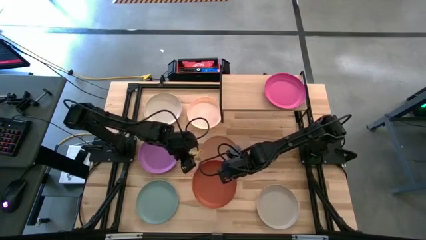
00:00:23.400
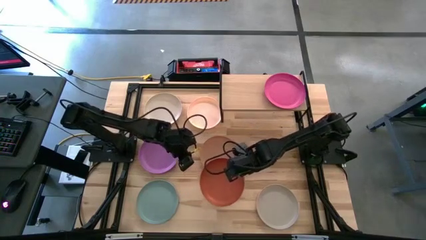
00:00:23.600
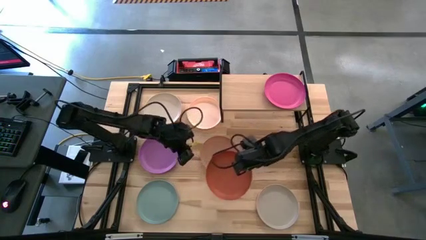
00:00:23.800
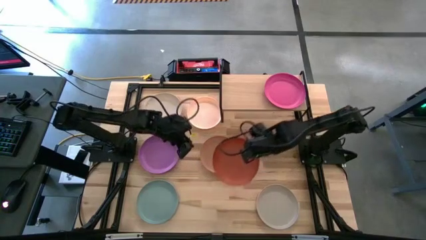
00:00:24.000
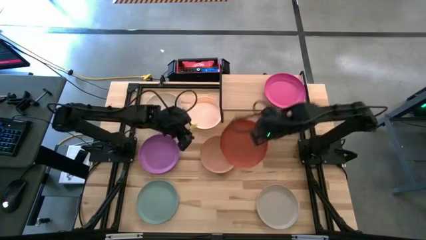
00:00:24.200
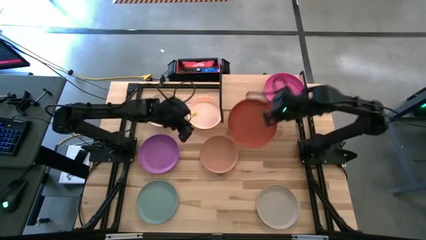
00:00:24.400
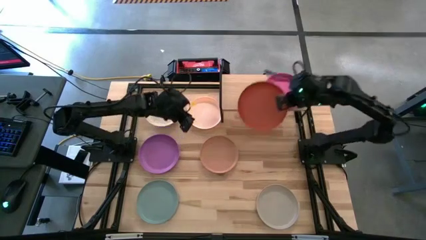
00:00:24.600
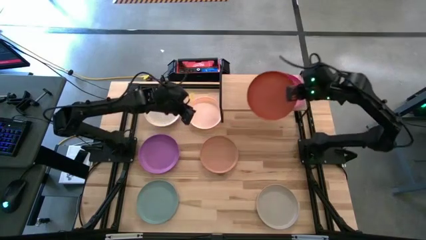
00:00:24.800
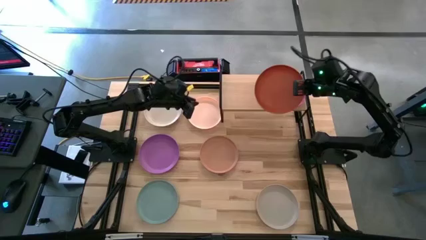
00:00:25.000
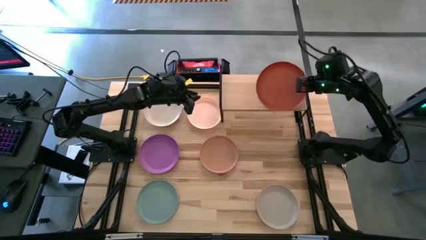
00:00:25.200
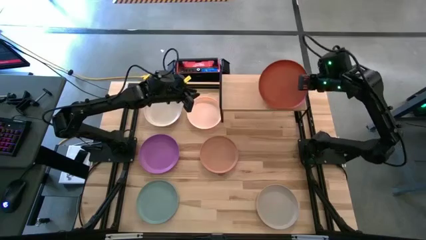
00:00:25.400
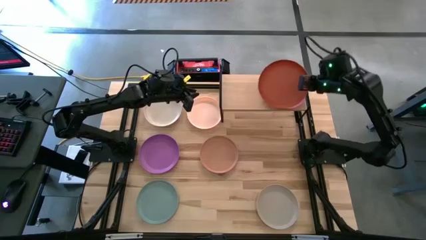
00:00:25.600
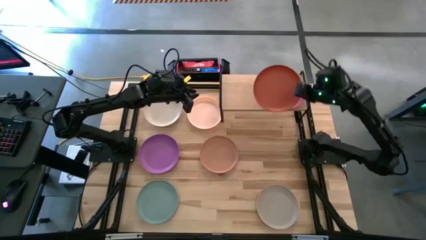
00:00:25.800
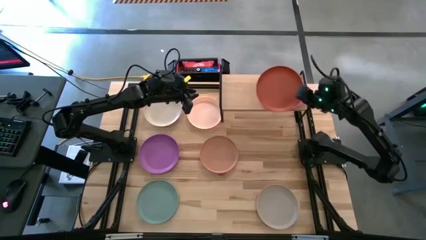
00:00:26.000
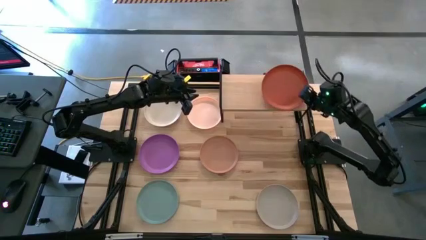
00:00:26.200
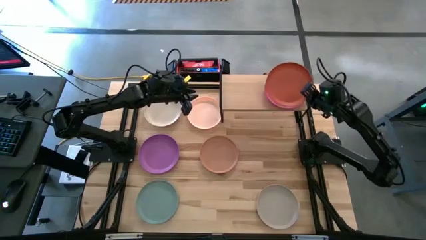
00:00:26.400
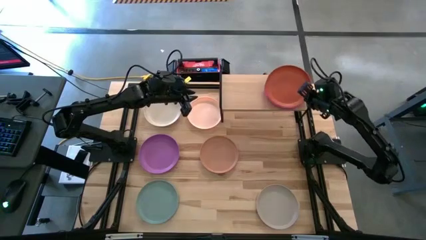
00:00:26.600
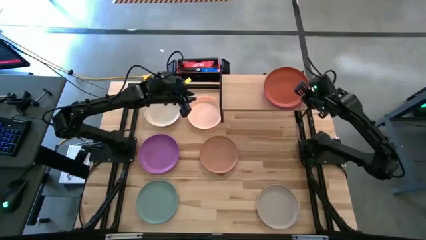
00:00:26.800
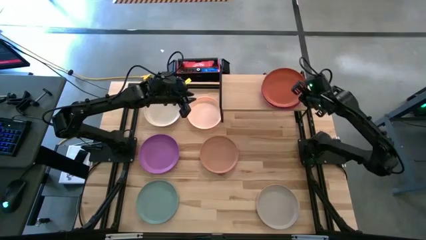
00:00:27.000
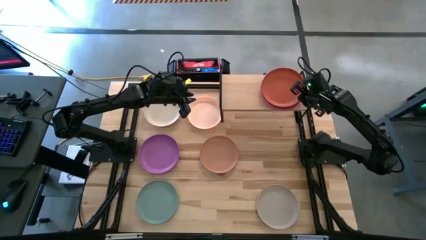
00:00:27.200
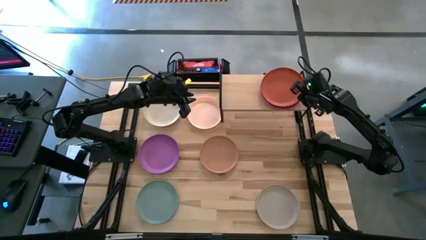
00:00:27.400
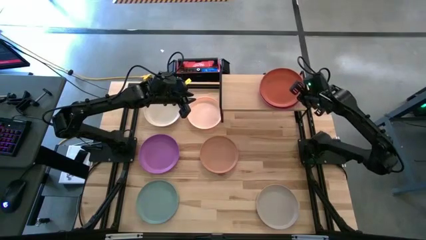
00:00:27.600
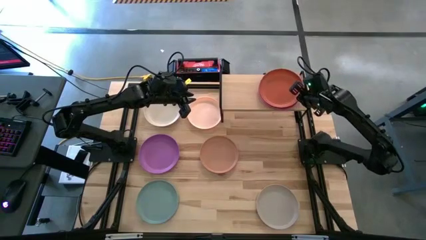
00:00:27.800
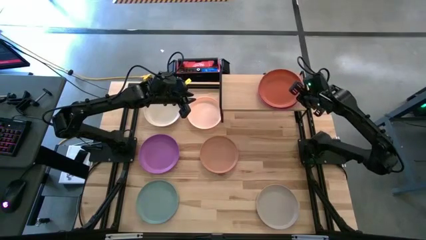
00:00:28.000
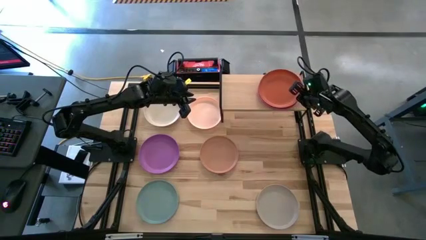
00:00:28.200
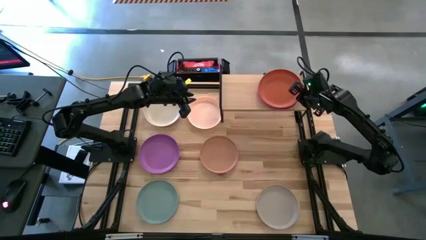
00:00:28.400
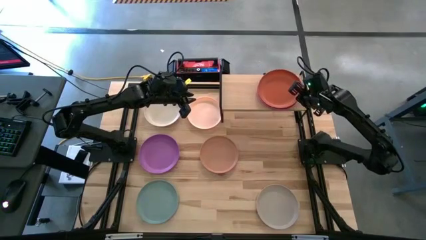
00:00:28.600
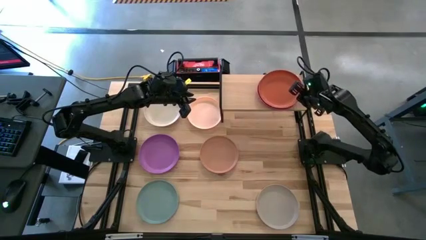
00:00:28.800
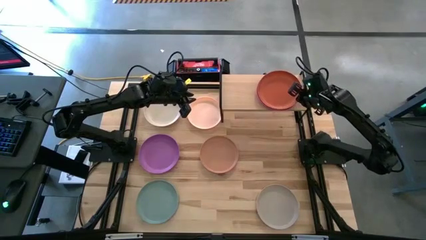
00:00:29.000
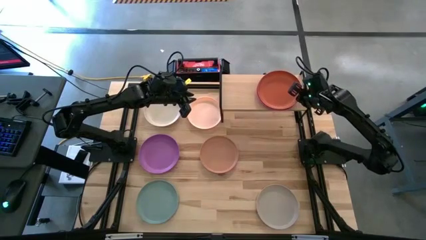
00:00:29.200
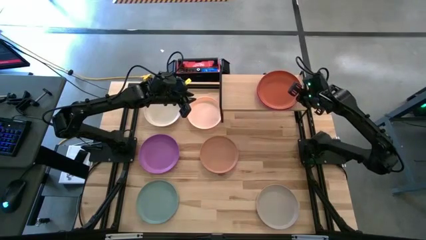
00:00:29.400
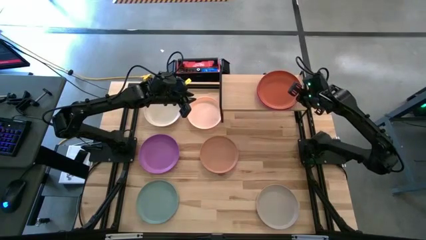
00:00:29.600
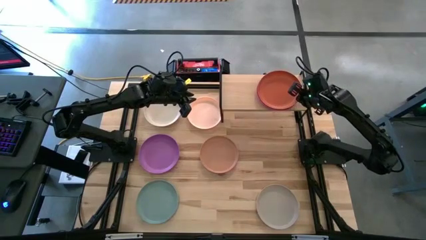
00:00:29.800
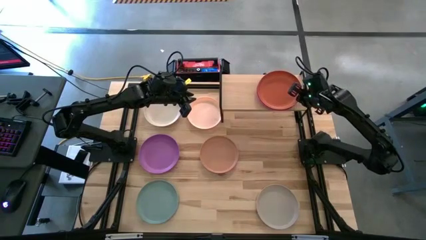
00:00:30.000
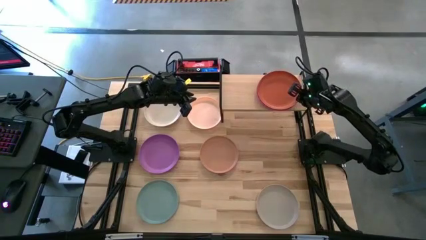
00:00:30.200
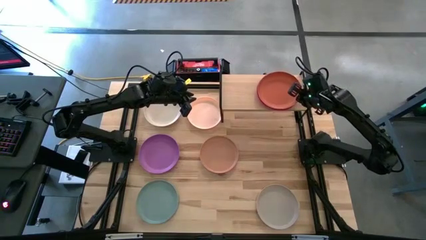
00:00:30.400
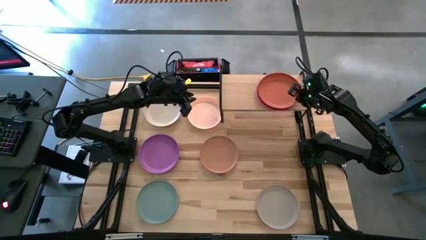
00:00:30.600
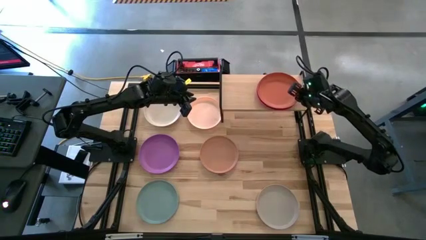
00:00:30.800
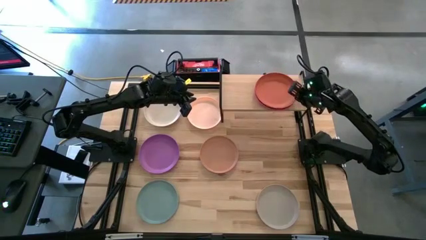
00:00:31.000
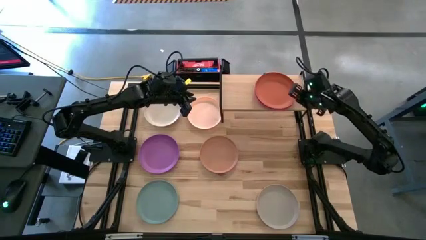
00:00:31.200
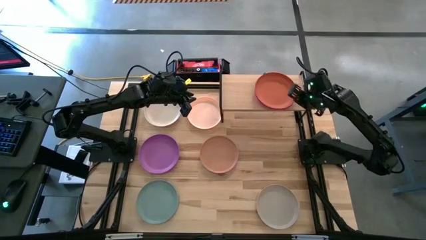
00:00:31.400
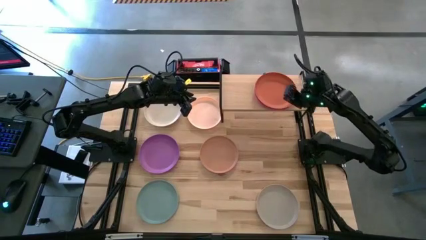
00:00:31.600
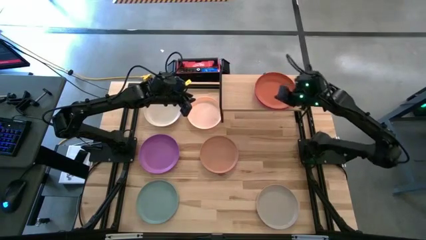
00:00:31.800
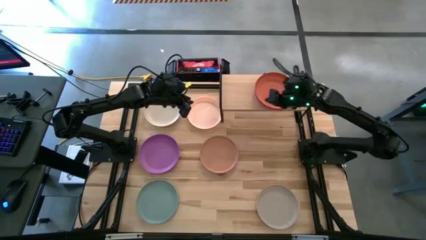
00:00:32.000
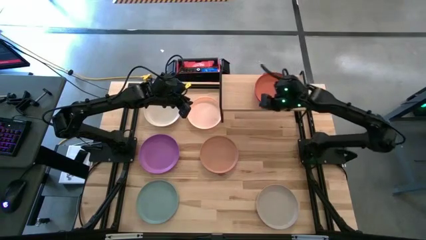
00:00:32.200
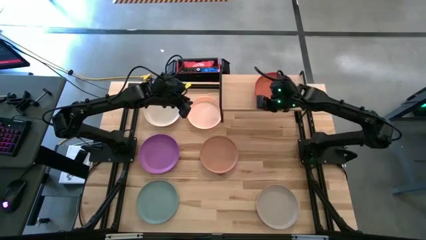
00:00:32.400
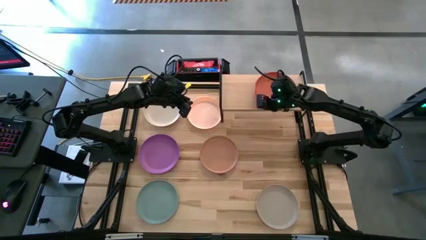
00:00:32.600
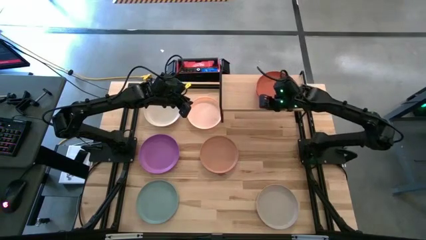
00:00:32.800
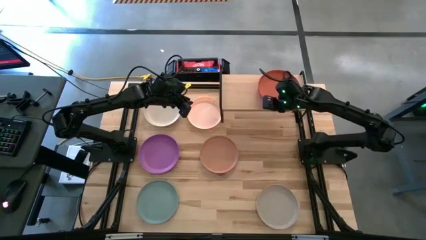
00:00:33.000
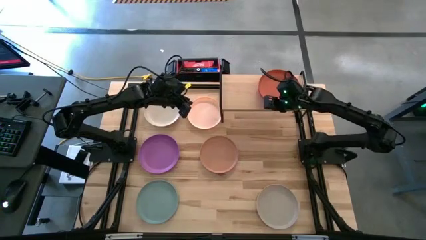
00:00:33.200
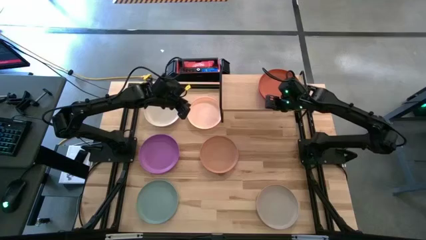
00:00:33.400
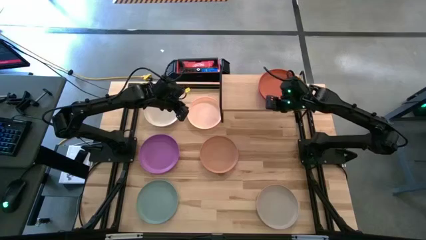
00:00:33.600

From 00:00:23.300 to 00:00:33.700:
Task: Place and stack plates onto a shelf
Stack the orange plate on top of the pink plate
